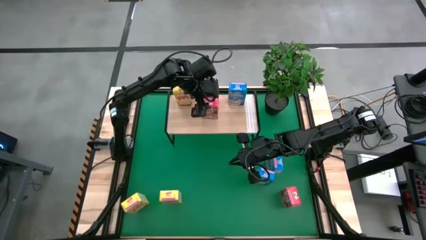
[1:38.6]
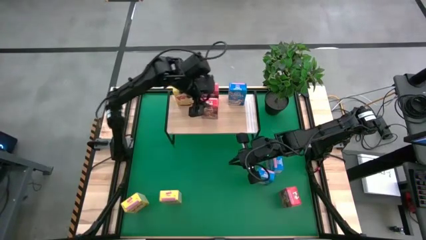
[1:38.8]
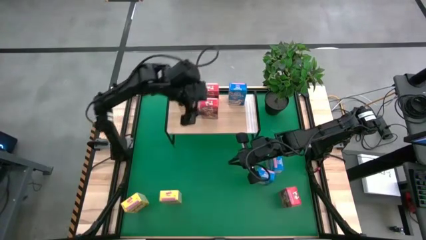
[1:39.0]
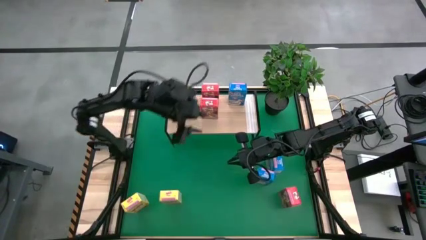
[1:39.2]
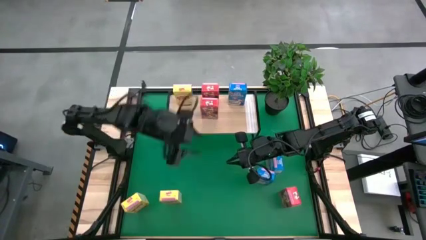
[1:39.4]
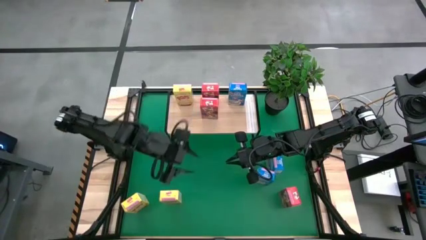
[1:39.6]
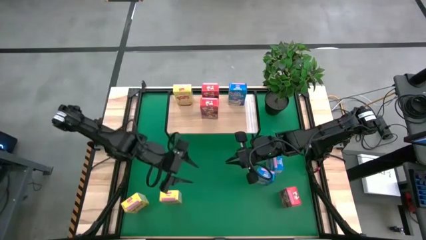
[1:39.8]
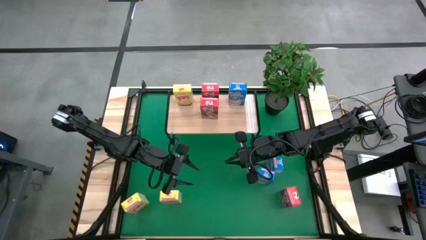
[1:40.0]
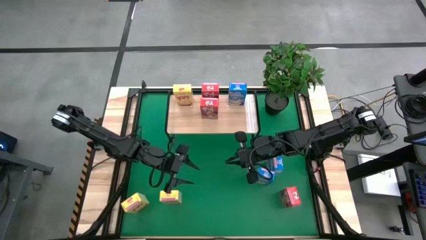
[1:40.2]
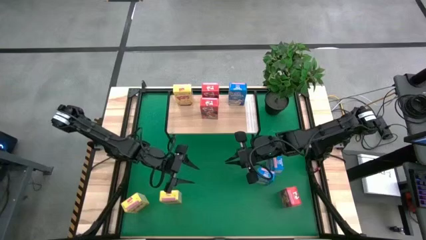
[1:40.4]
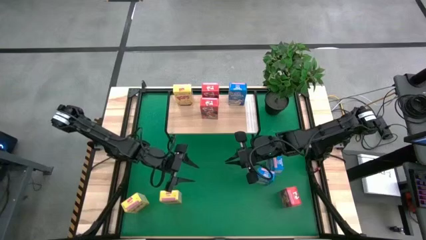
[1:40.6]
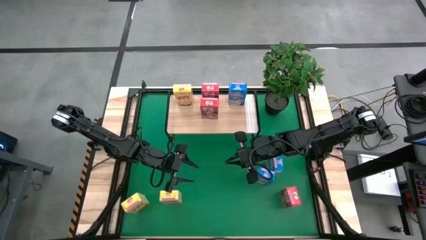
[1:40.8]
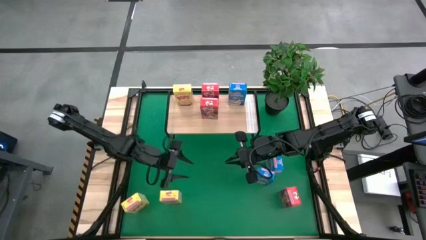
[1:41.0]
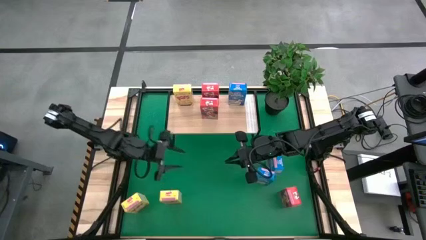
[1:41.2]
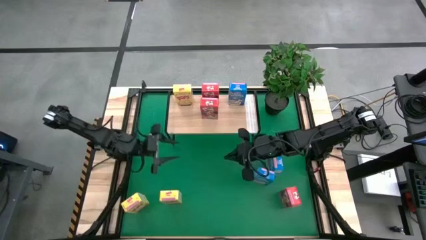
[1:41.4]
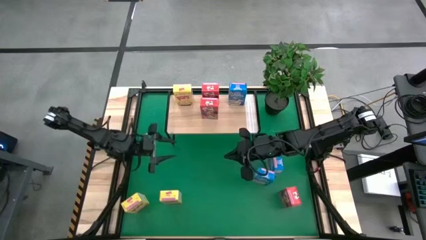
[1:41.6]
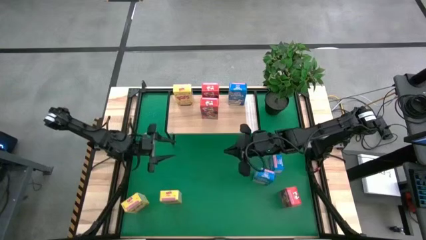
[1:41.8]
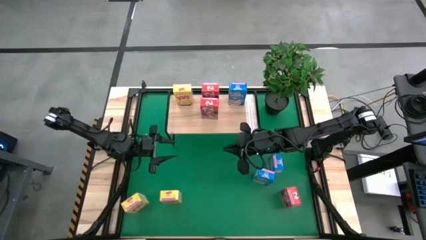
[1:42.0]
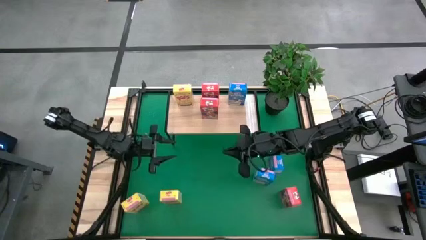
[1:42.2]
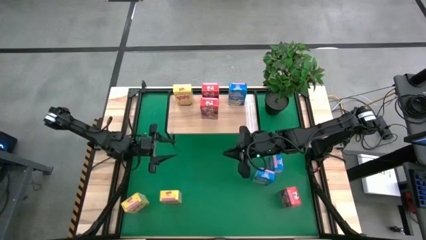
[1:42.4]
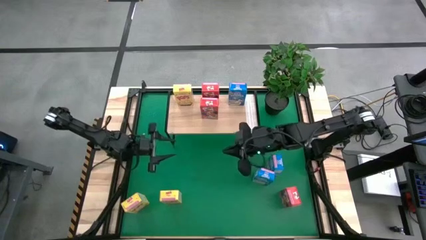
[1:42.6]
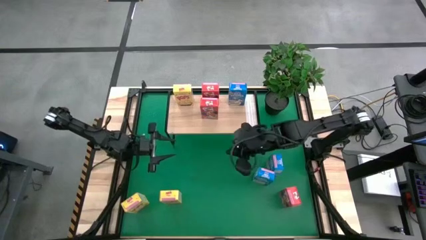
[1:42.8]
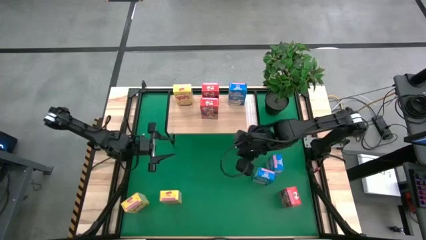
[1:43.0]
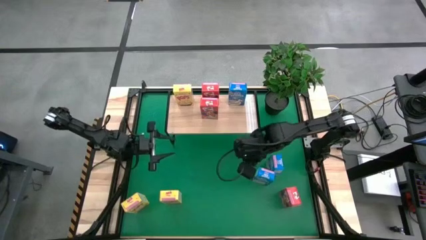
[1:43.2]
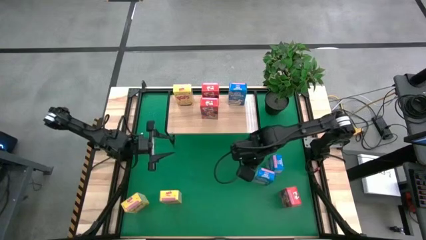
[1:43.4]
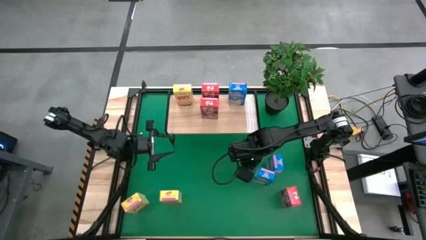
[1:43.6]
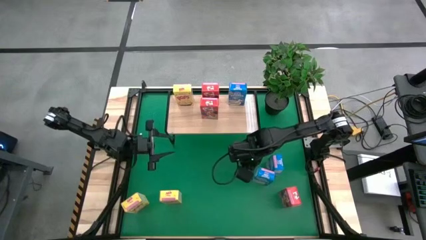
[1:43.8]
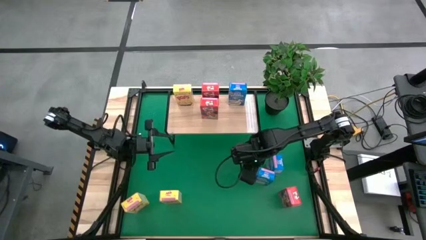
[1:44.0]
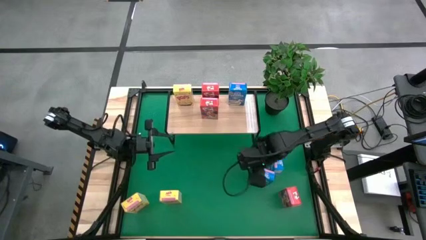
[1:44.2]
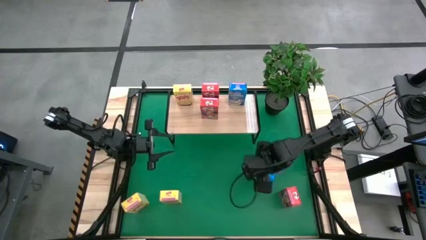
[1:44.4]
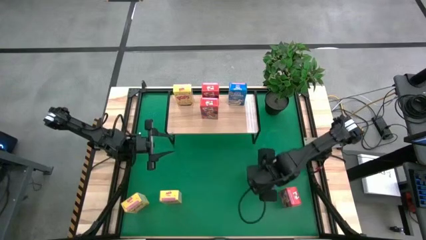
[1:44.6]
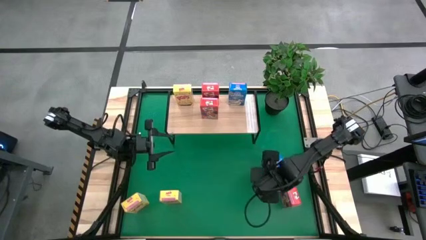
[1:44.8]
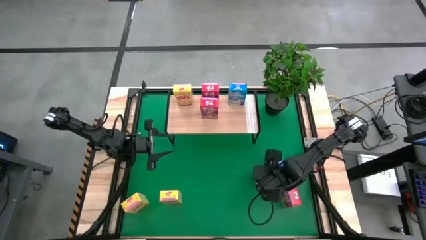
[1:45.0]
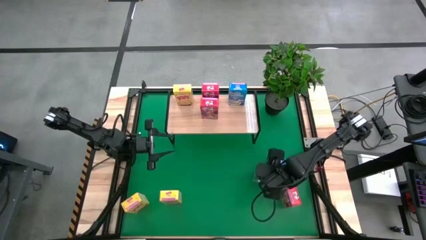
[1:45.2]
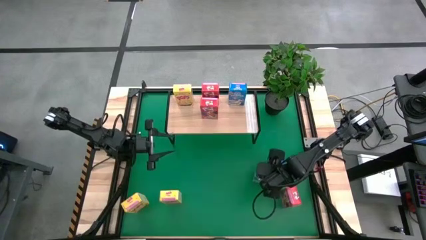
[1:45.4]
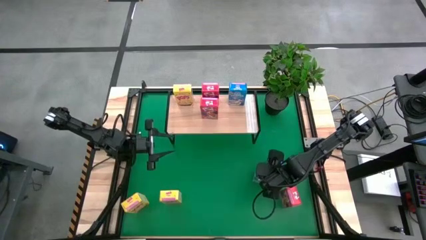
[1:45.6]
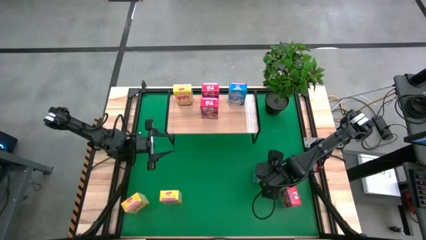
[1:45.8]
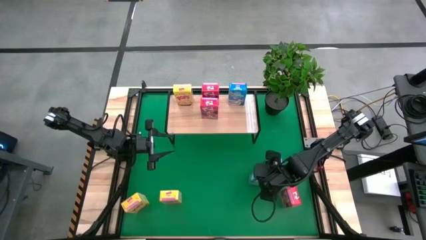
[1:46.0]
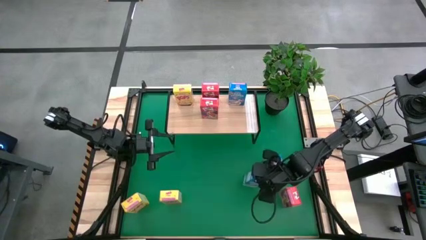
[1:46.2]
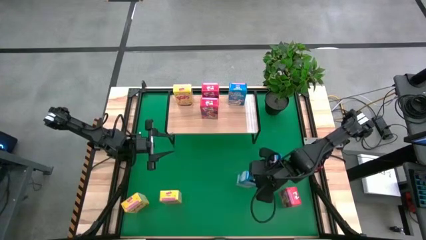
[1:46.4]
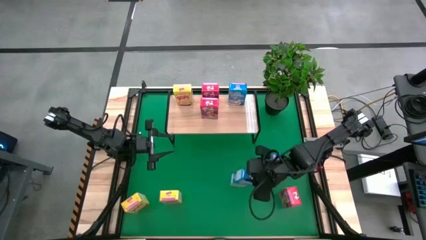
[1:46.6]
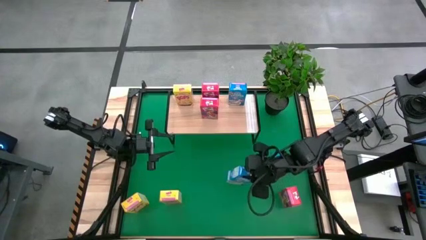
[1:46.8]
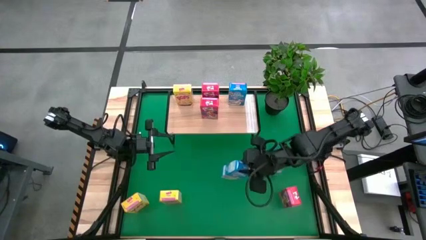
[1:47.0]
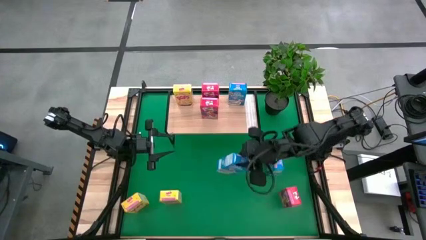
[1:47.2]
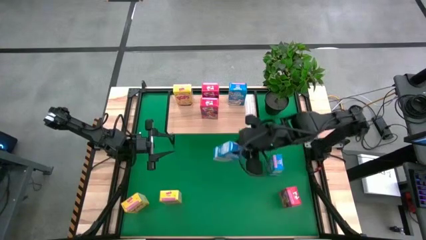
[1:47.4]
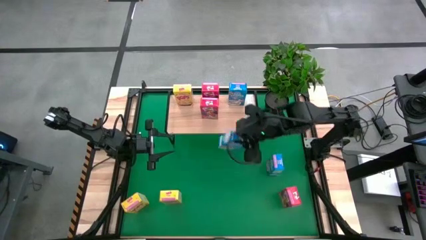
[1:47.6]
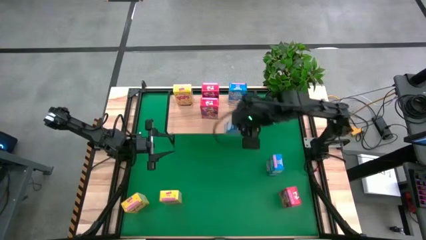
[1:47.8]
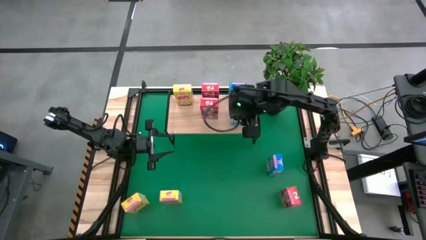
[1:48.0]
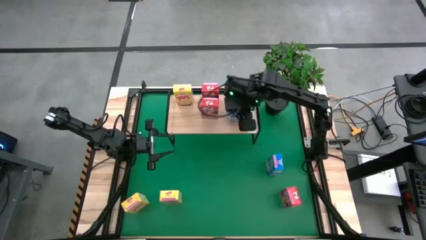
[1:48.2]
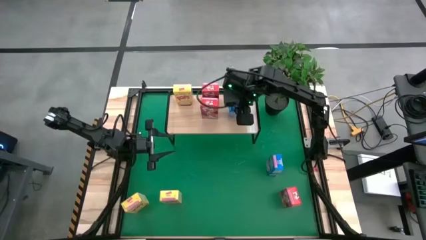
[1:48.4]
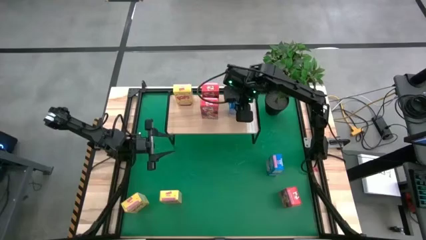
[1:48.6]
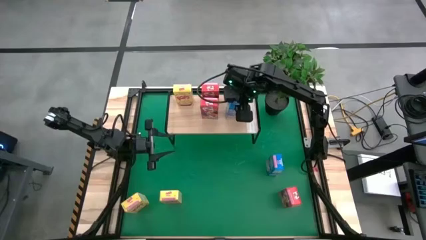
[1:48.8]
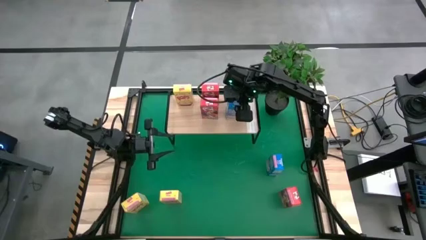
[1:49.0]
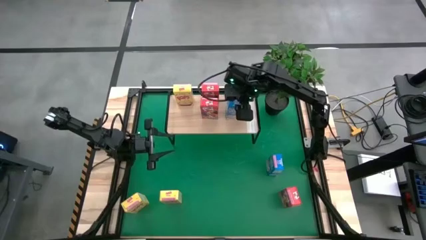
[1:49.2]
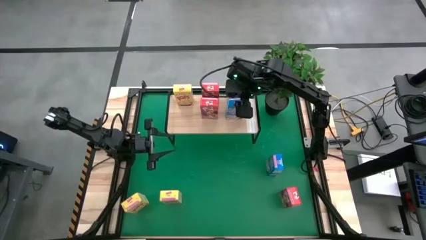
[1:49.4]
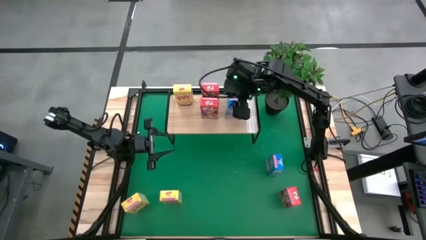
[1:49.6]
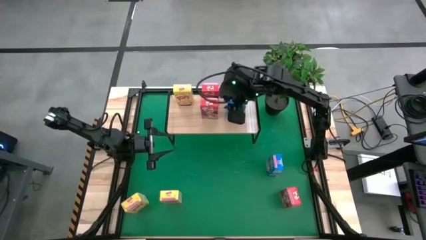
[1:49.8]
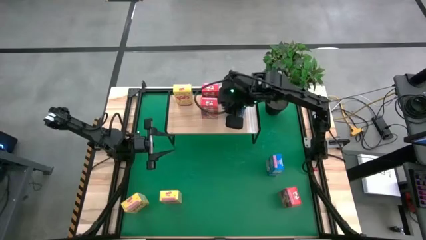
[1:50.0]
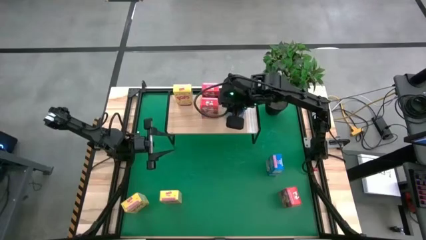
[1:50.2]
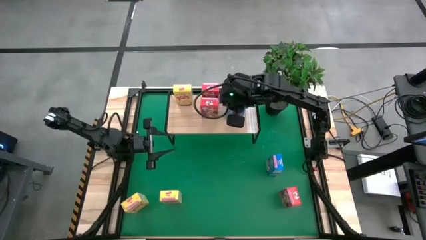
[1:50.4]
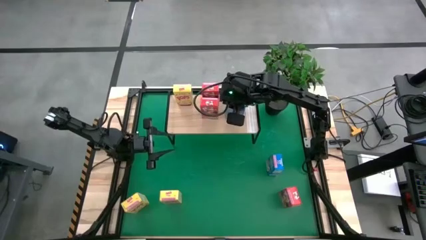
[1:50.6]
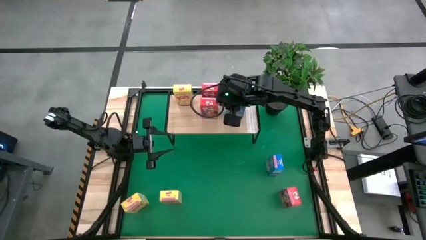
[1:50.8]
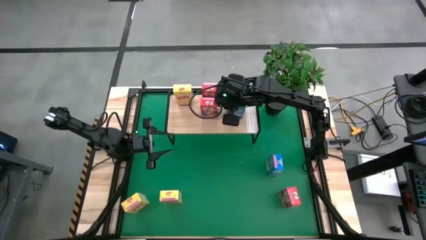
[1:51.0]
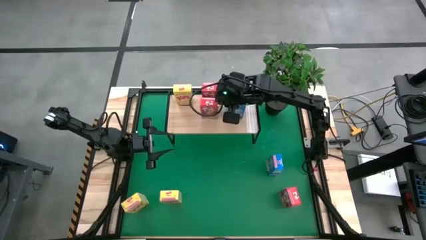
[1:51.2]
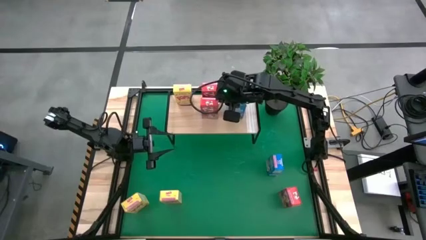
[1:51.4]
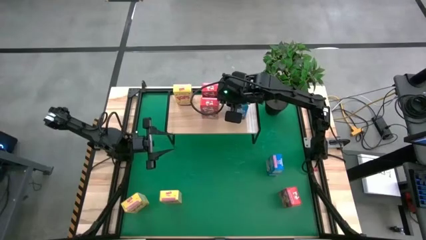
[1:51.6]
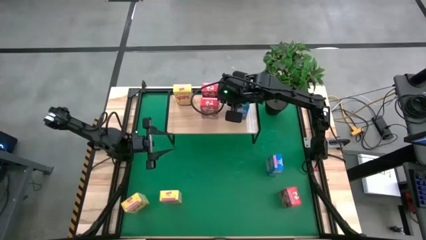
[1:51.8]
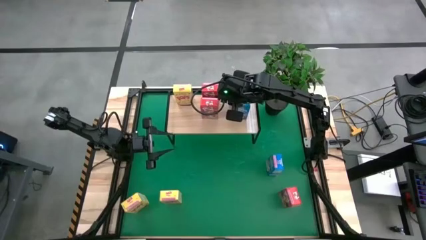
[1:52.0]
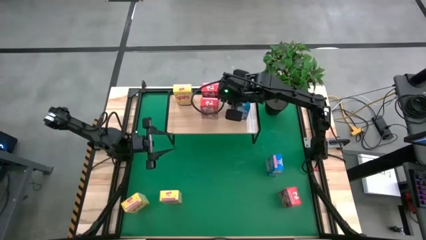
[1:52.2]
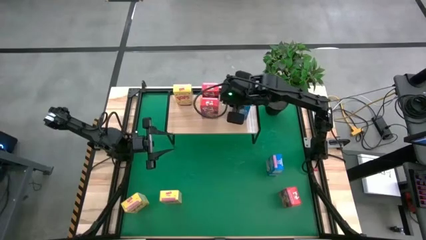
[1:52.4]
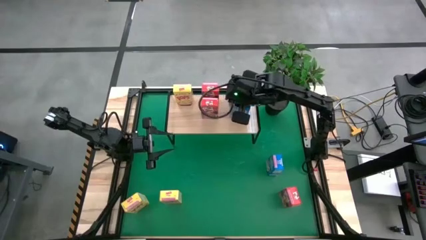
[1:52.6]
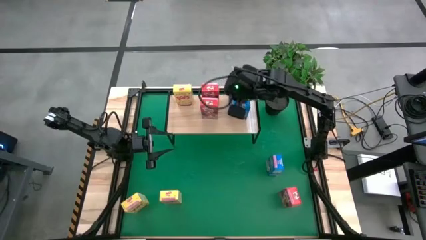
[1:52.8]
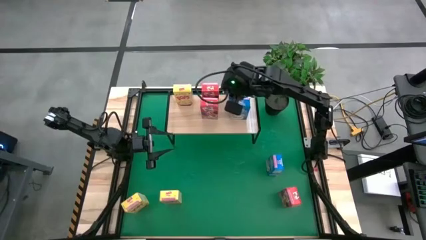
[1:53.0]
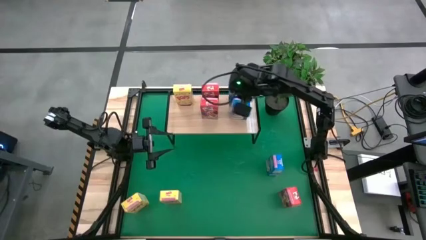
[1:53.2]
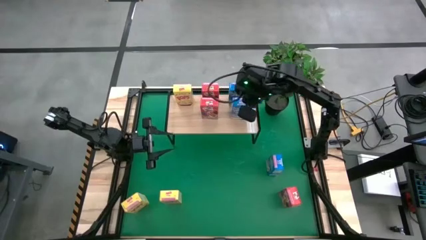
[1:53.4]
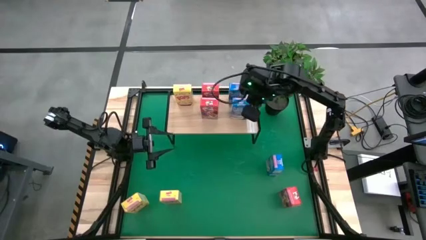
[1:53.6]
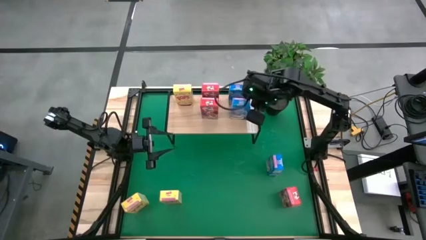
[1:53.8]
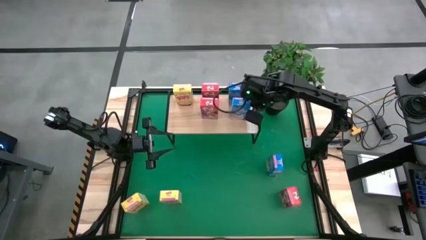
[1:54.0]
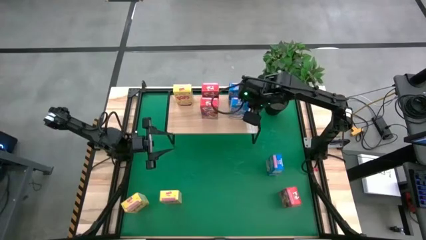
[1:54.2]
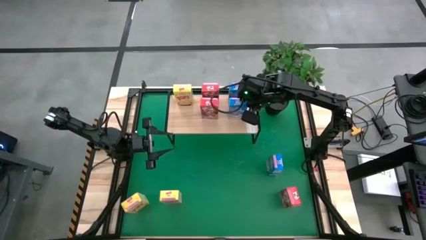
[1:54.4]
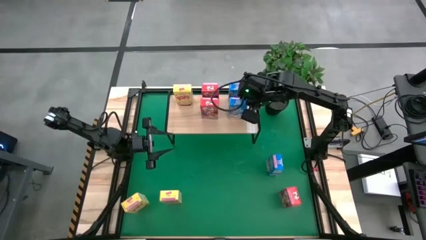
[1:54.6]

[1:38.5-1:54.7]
Task: Stack cereal on shelf
Put the bottom blue cereal box on the shelf aligned with the other blue cereal box
